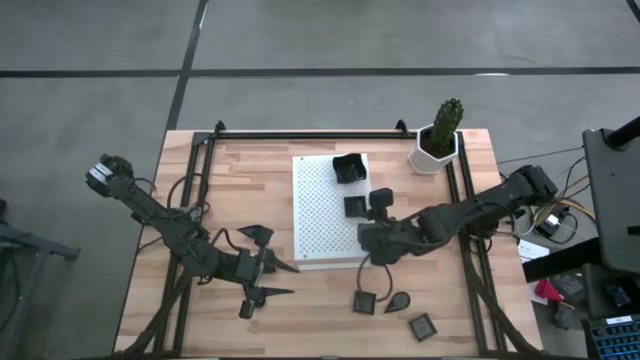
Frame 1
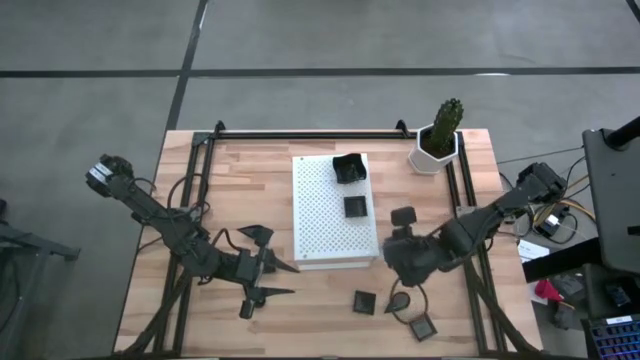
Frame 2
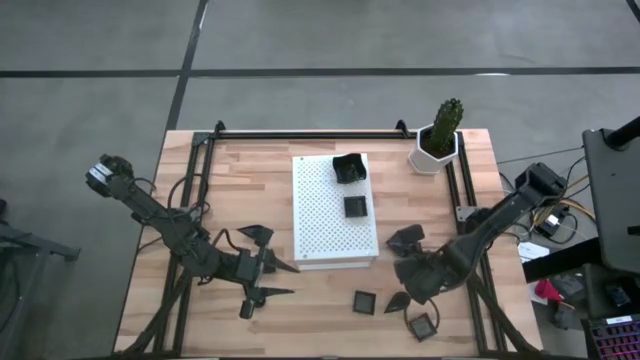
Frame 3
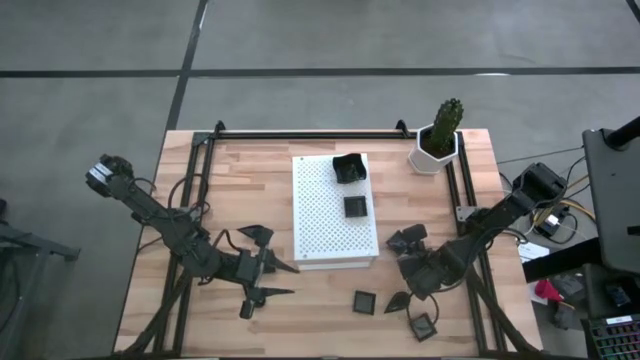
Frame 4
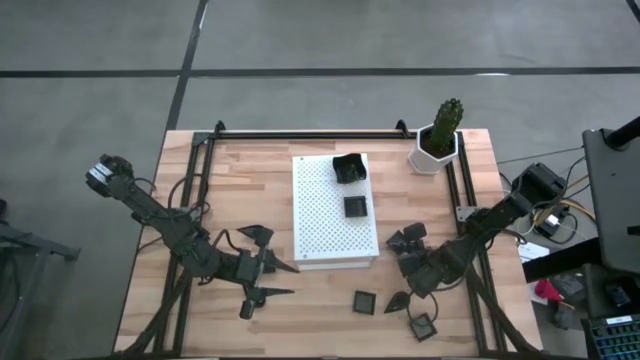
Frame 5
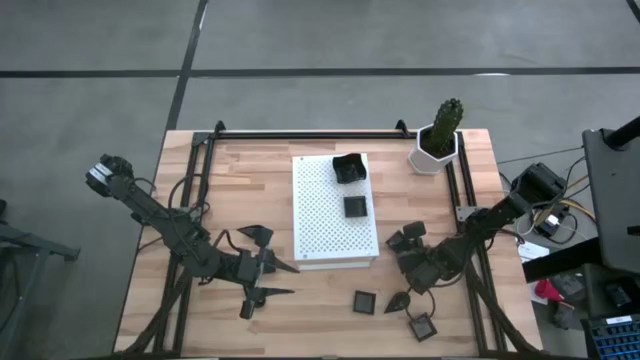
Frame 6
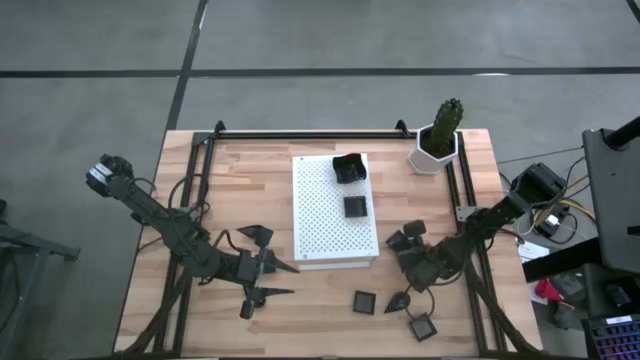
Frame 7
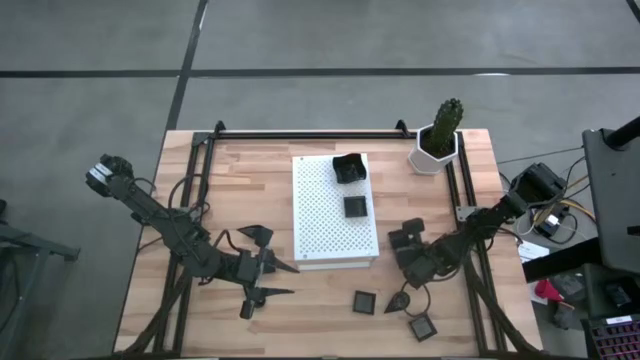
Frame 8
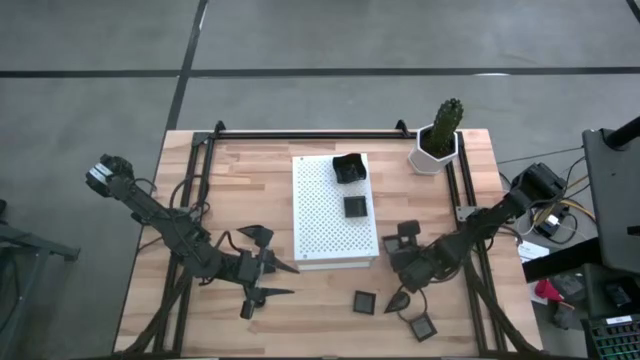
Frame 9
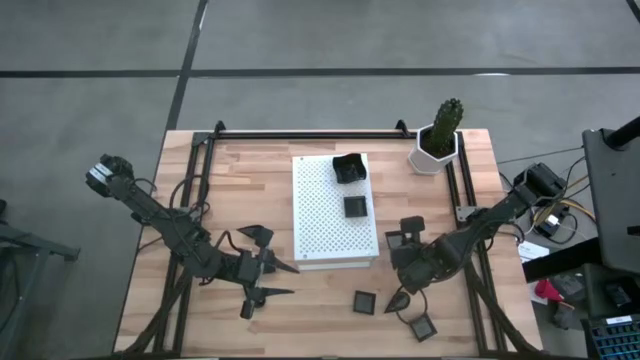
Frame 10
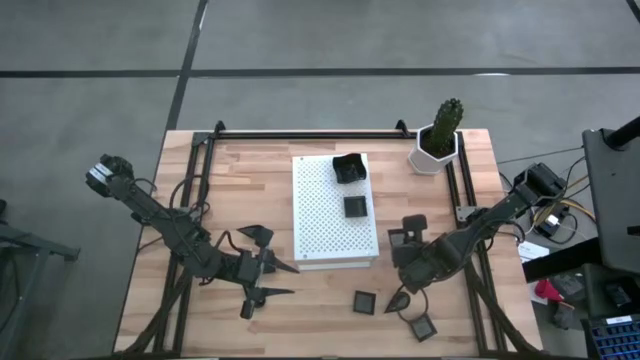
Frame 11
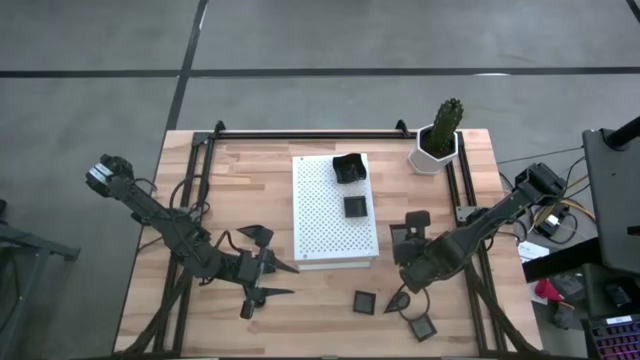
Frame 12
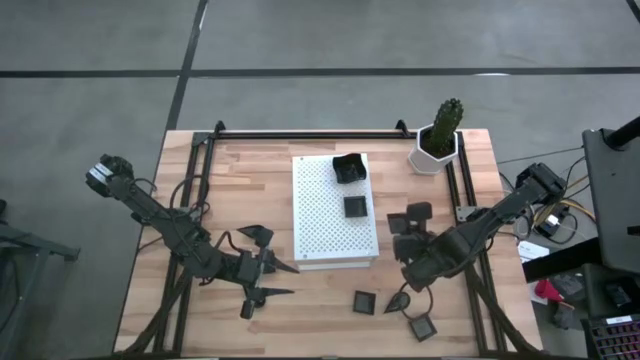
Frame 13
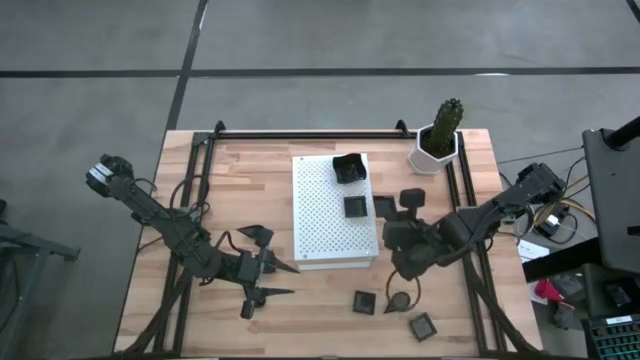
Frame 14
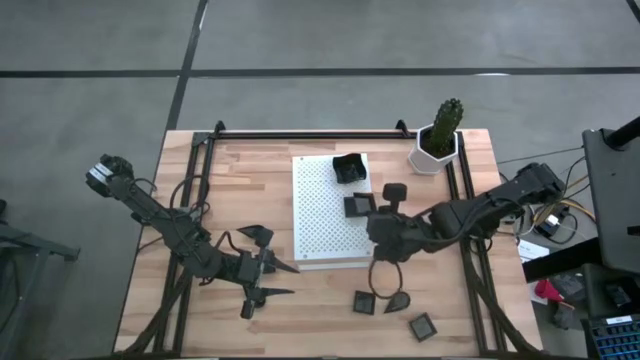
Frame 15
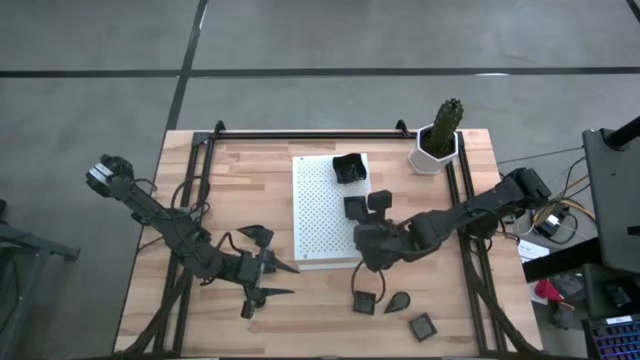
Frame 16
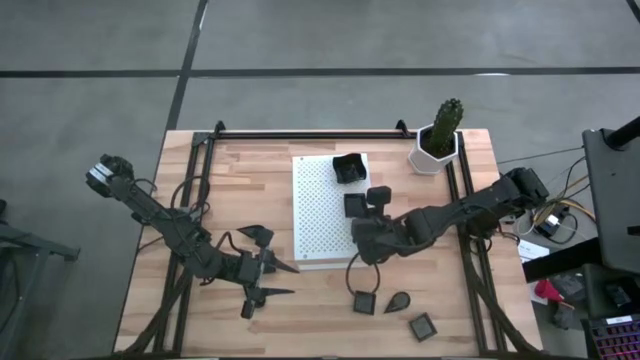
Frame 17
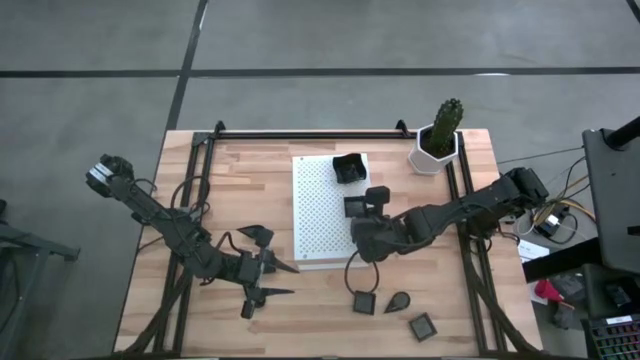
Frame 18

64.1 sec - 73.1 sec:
Task: Pick & Place Mini shaped plates
Stack the black square plate on top of the black square plate on the shelf

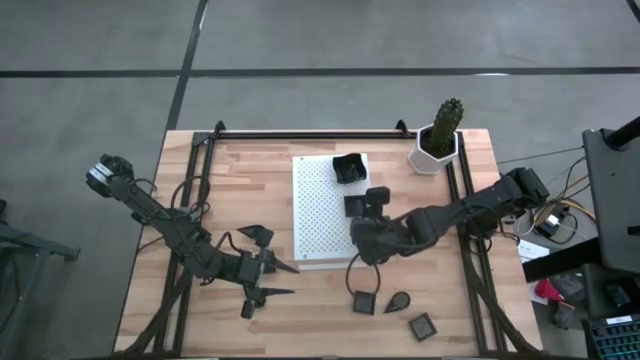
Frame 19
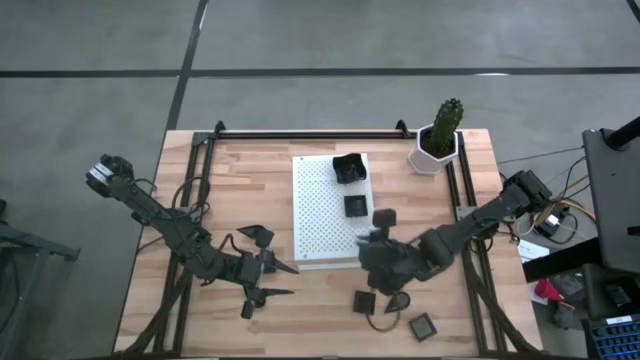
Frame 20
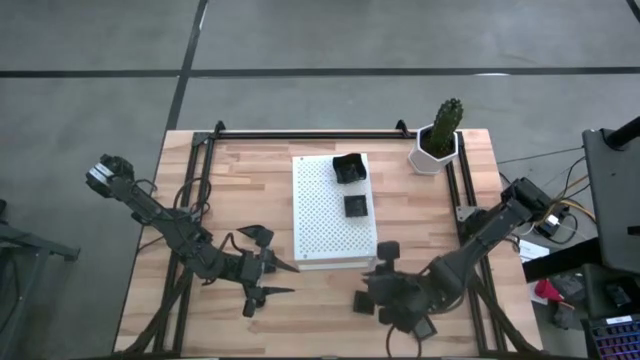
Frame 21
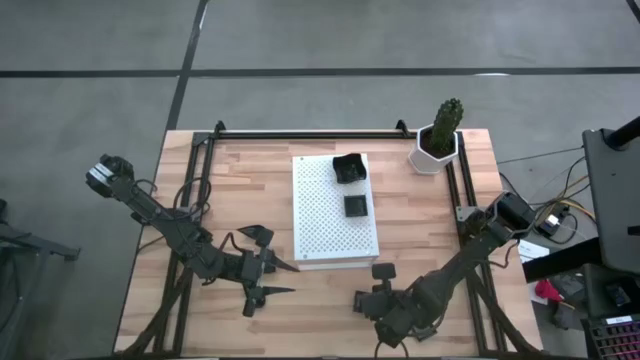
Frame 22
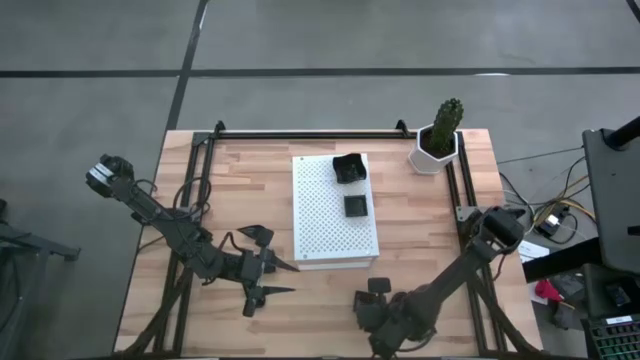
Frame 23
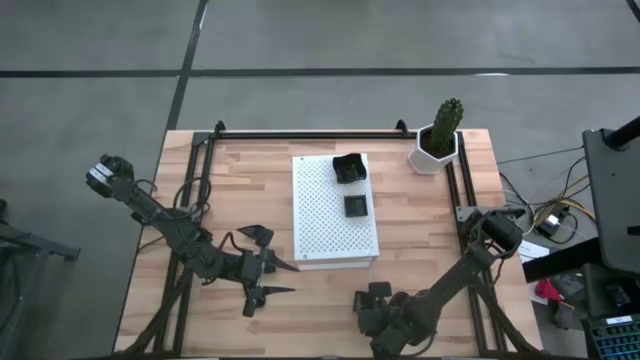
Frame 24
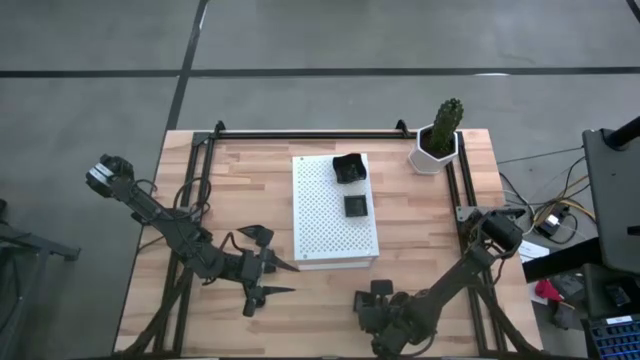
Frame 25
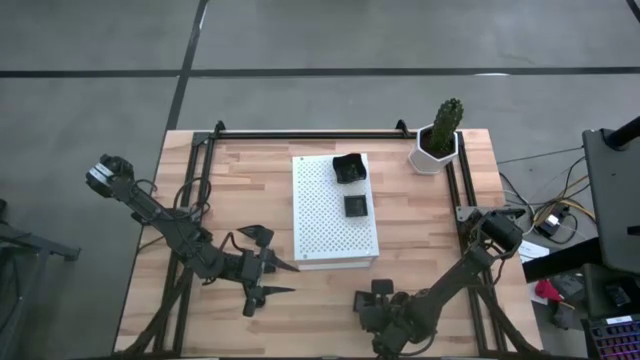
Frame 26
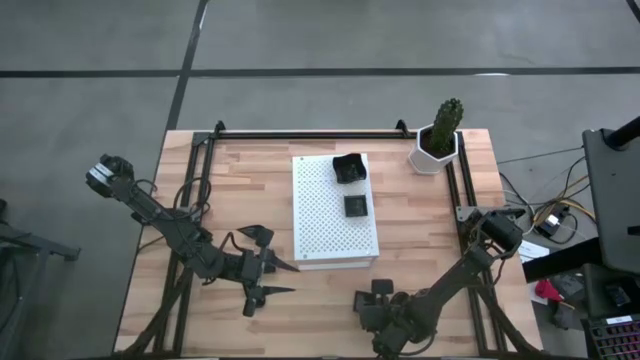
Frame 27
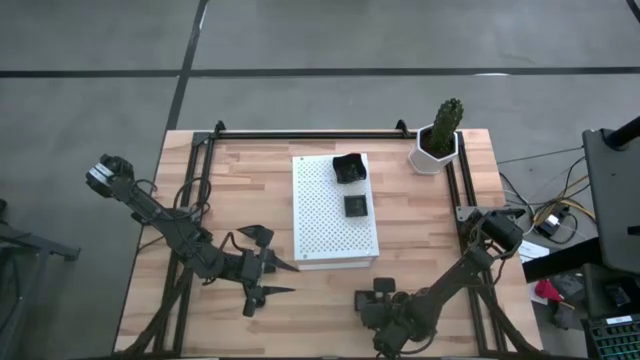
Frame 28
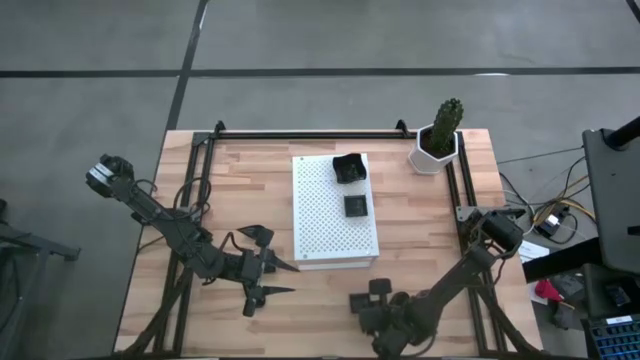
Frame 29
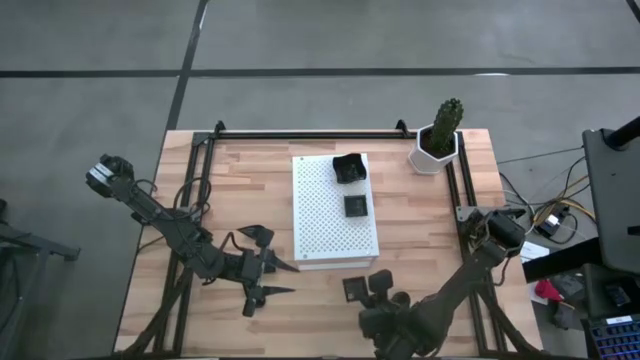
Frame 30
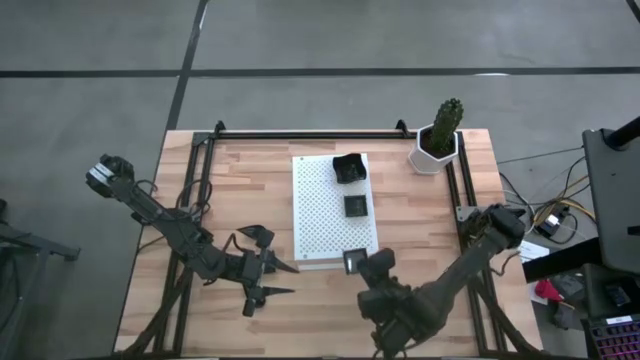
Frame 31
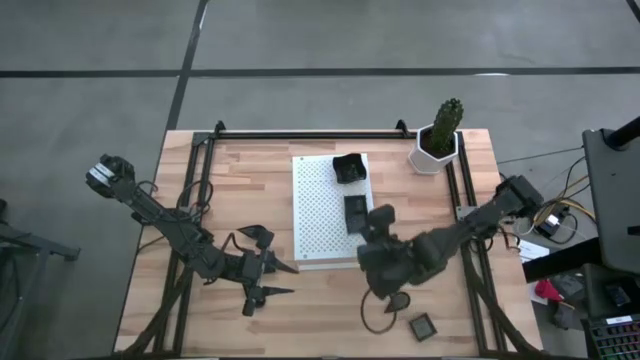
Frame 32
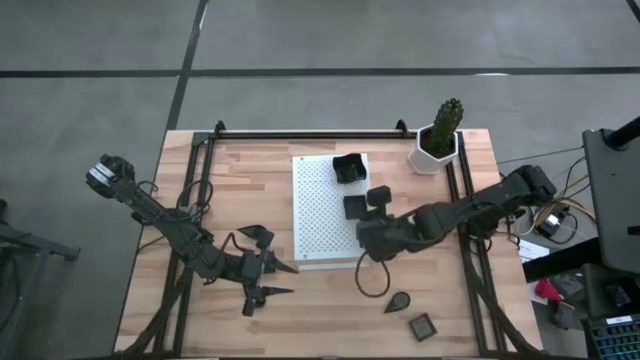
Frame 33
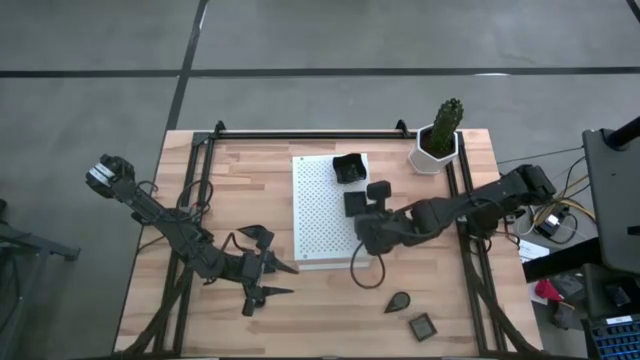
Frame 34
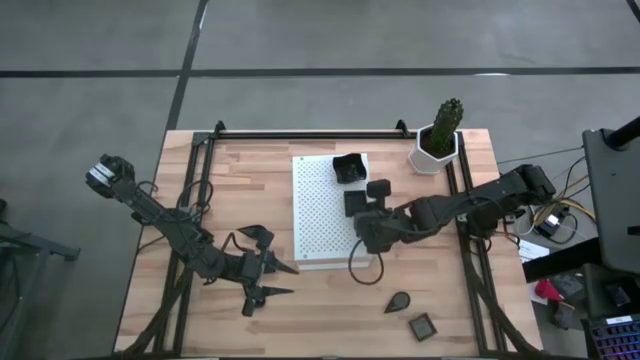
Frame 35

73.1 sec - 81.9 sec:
Stack the black square plate on top of the black square plate on the shelf

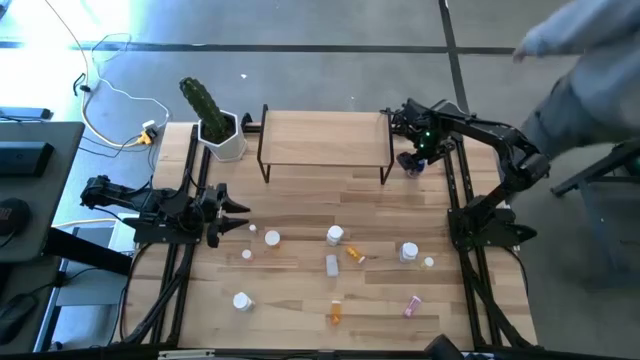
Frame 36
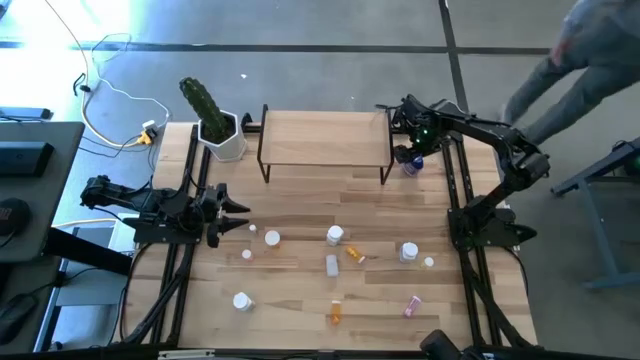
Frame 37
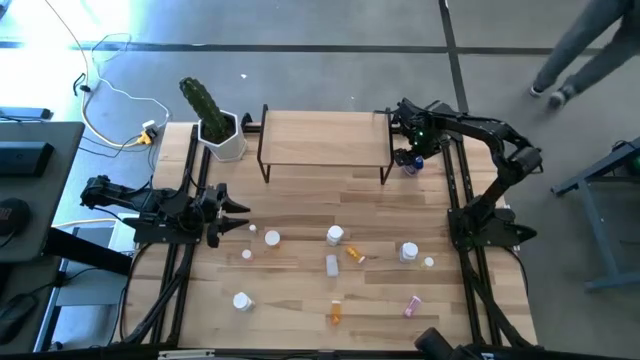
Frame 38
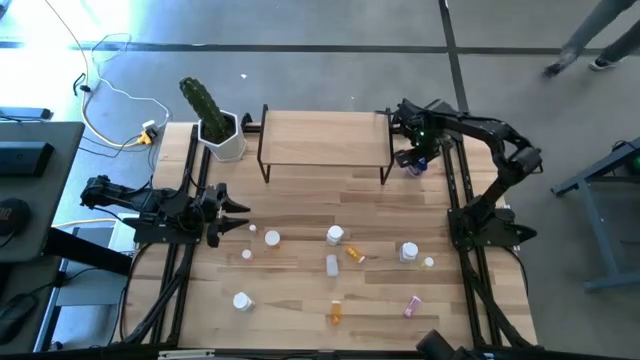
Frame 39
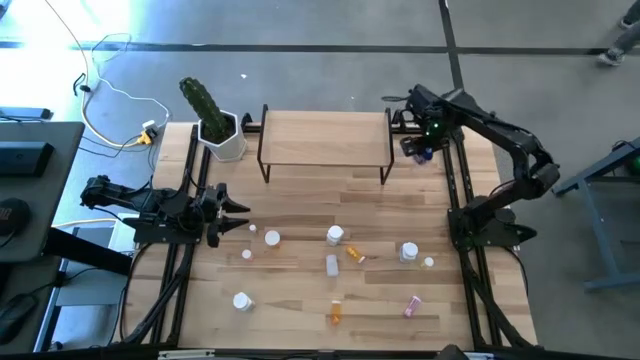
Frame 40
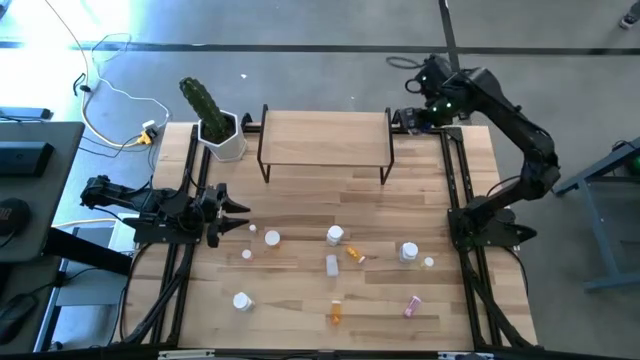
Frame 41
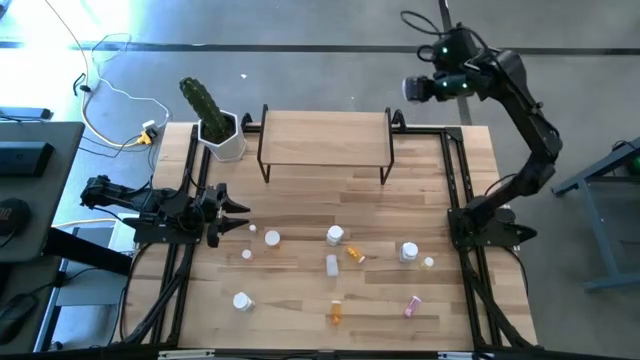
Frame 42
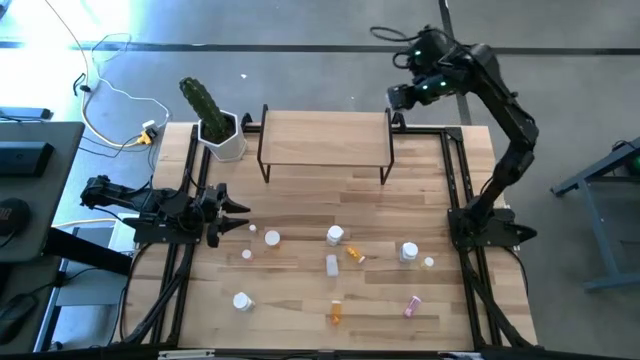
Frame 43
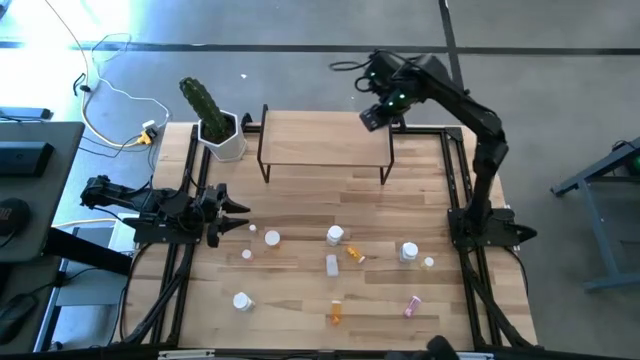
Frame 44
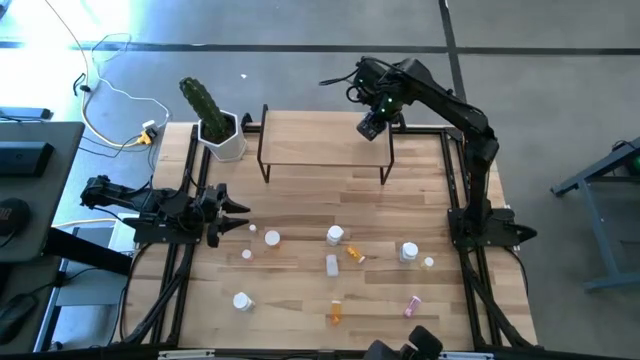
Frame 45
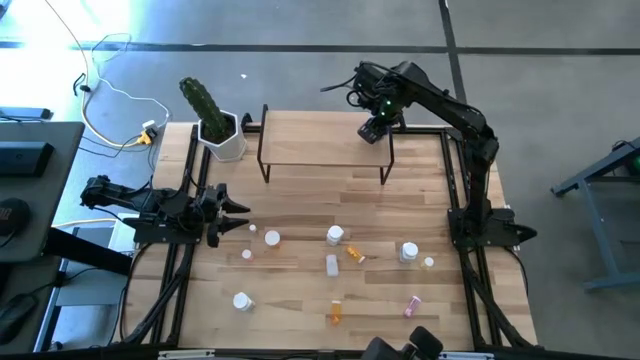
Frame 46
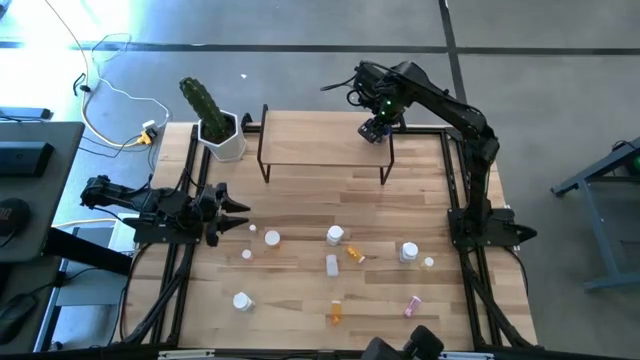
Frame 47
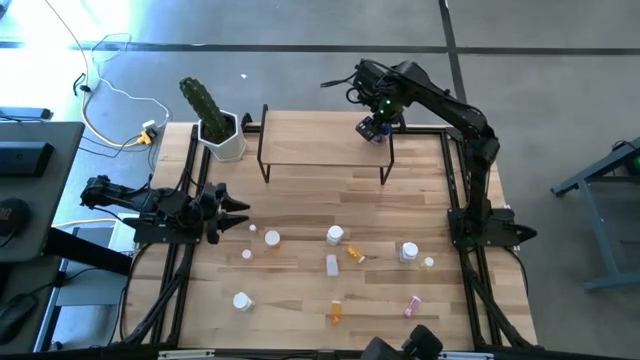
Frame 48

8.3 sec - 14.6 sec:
Task: Pick and place medicine bottles onto shelf by color
Put the dark blue pill bottle on the shelf
